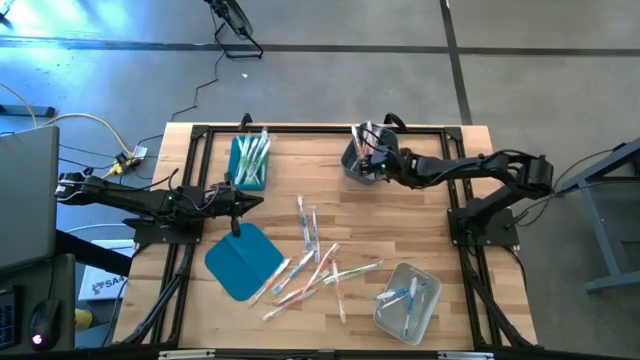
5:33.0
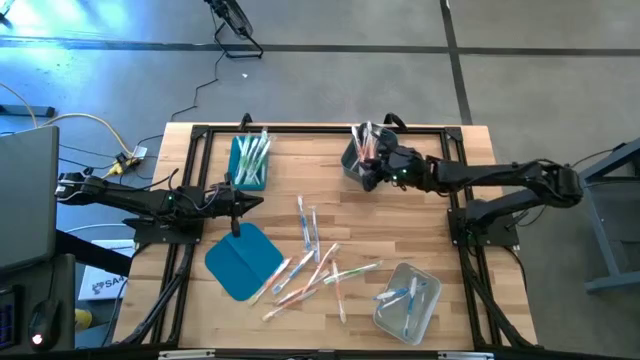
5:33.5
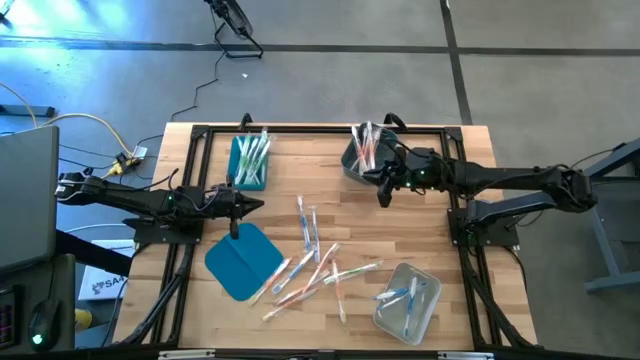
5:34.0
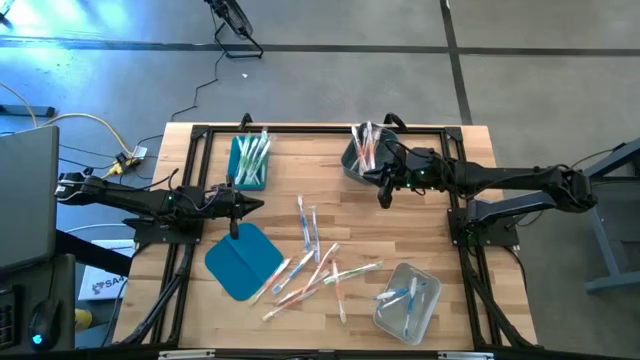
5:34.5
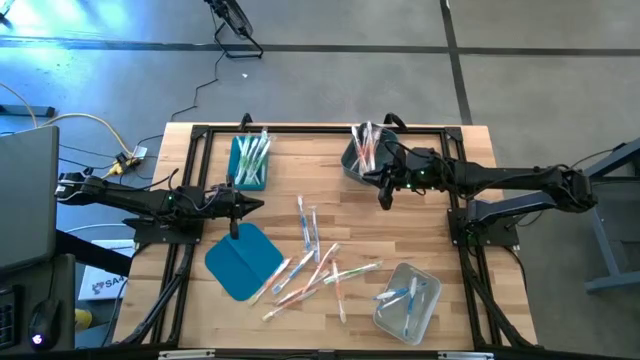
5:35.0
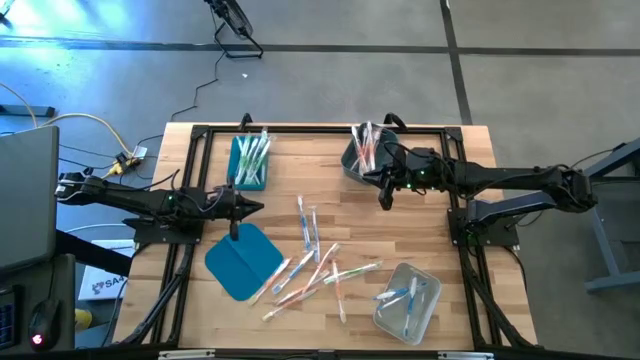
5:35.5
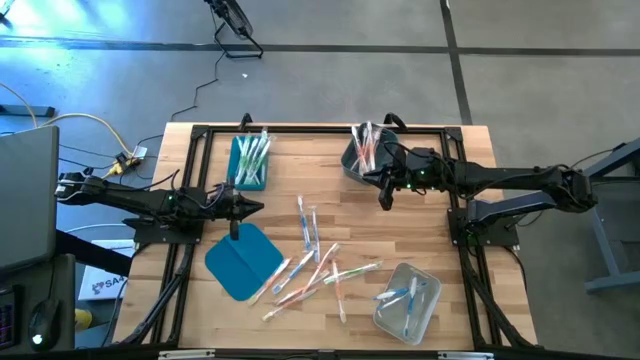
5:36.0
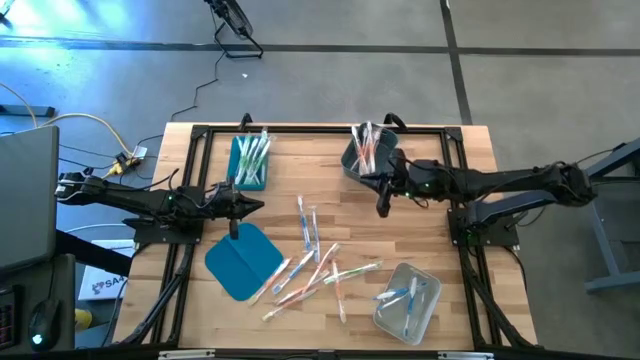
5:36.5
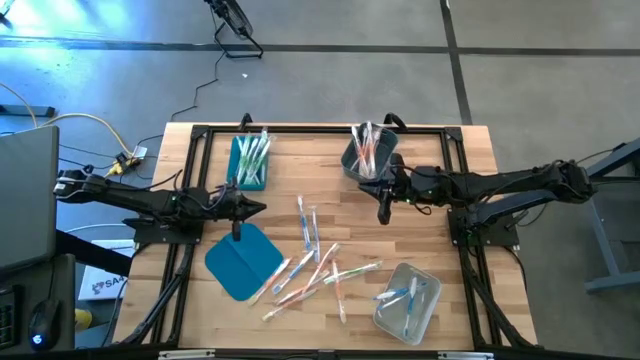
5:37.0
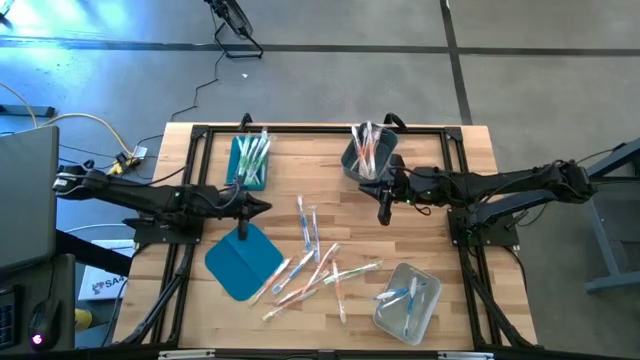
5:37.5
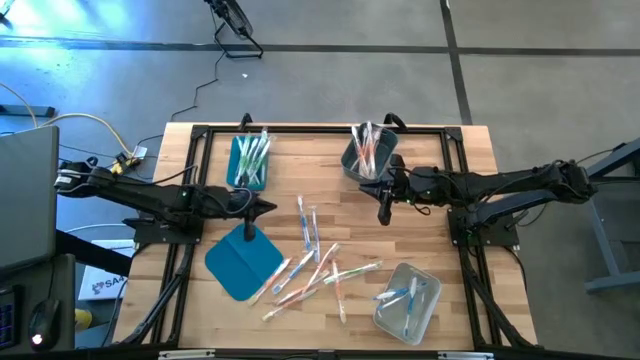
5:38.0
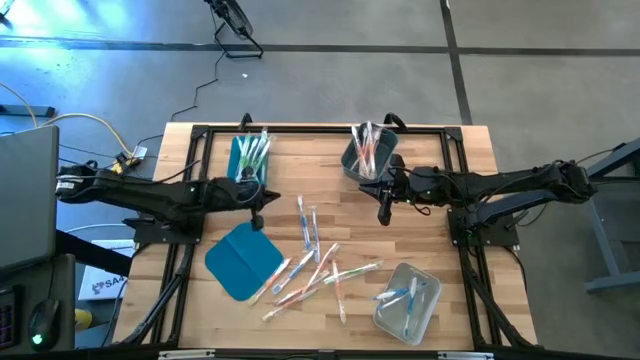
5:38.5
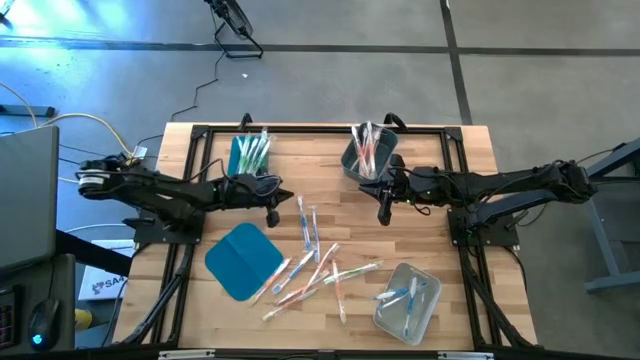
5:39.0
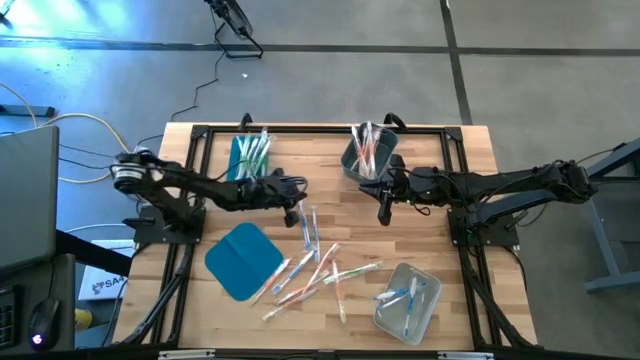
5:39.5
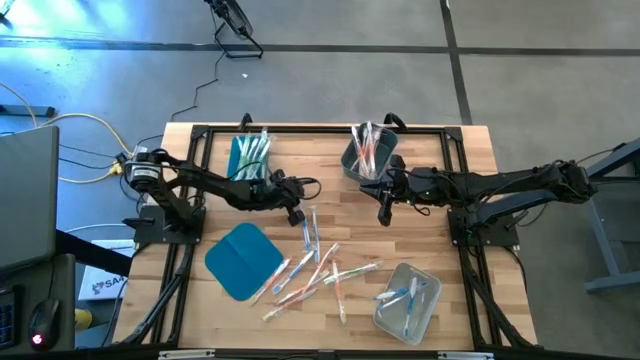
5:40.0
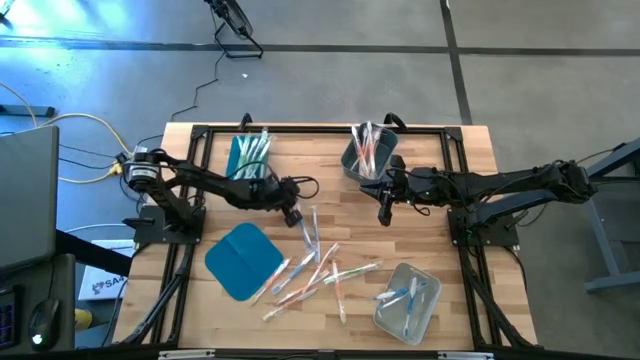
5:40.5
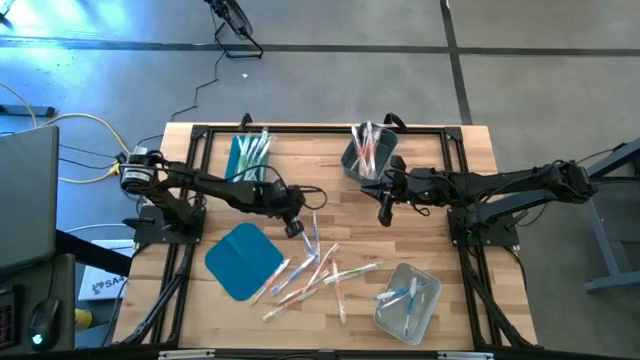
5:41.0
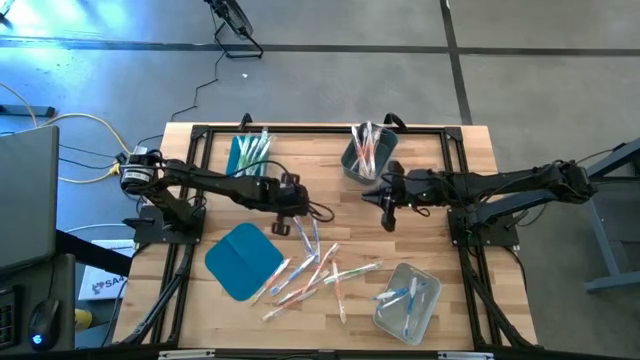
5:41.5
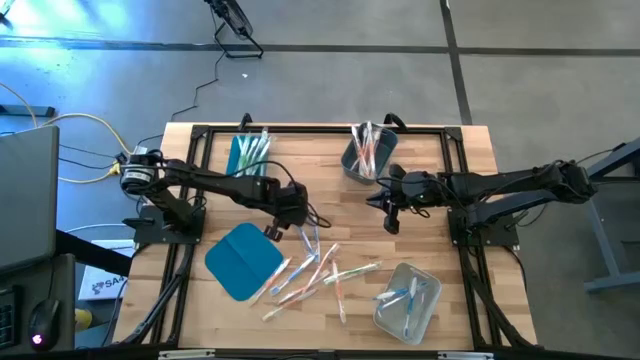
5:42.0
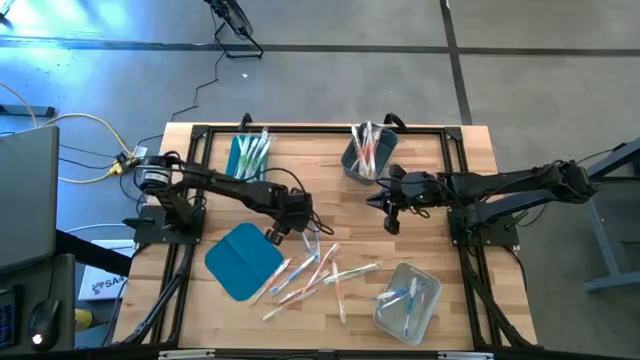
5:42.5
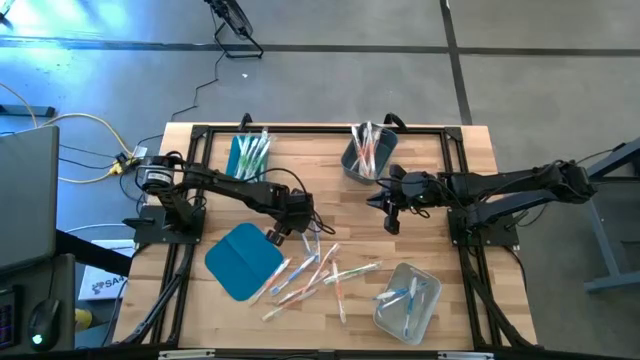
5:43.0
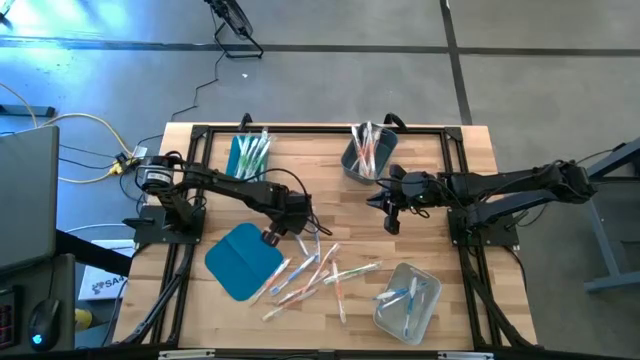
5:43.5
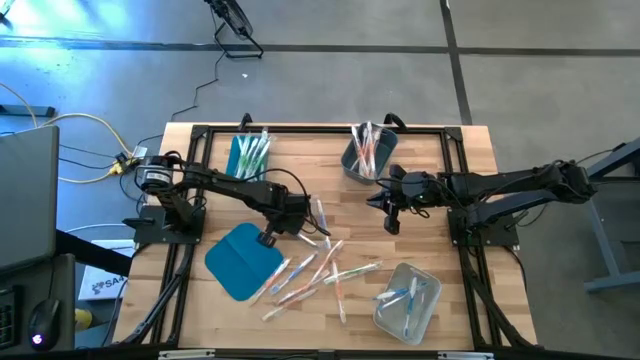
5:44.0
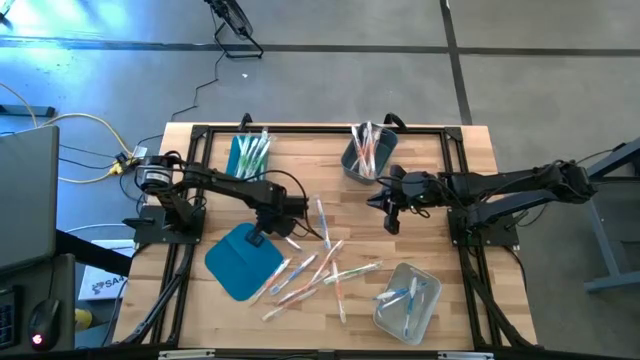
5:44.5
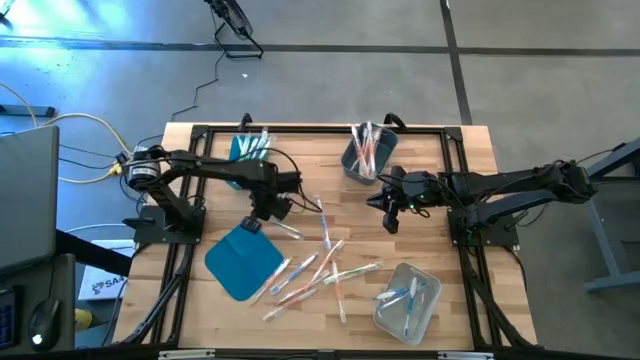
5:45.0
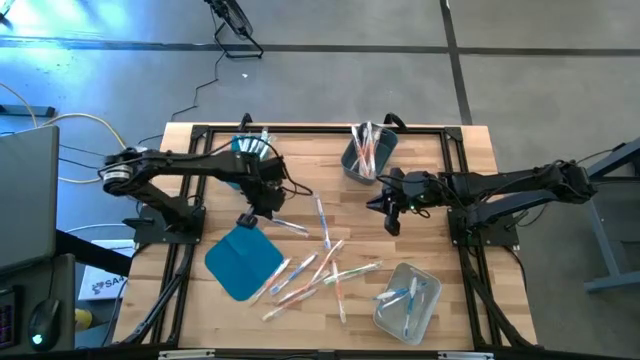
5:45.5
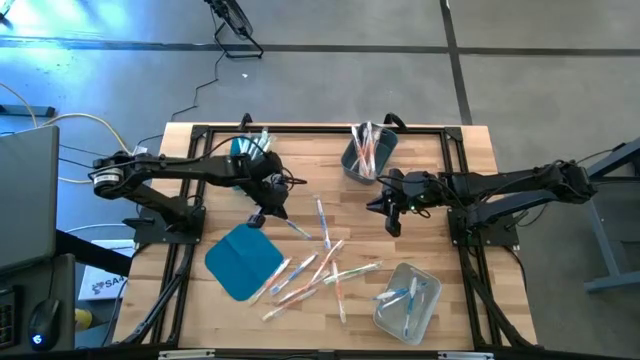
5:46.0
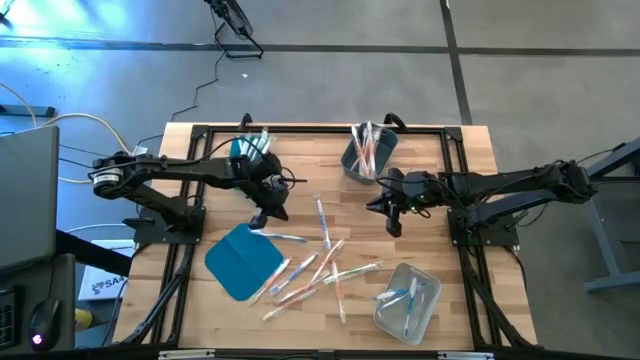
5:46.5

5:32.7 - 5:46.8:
Task: Pick & Place Toothbrushes
Put the top left blue toothbrush into the light gray bin
